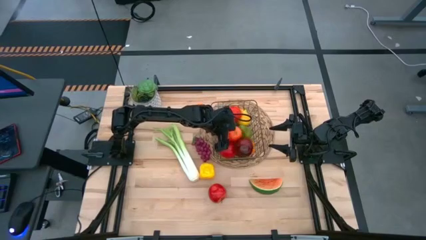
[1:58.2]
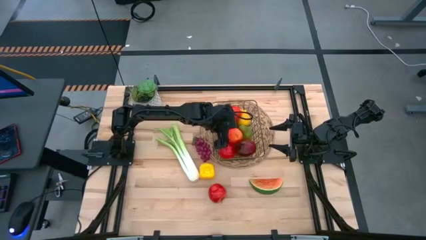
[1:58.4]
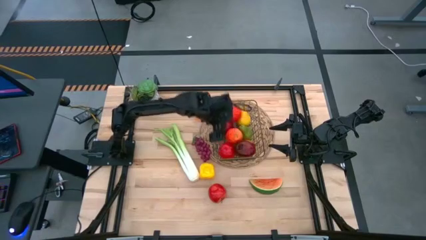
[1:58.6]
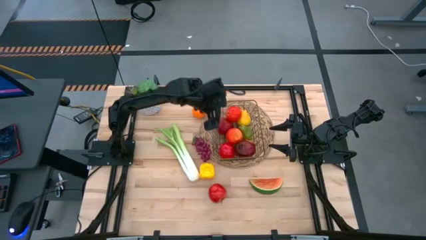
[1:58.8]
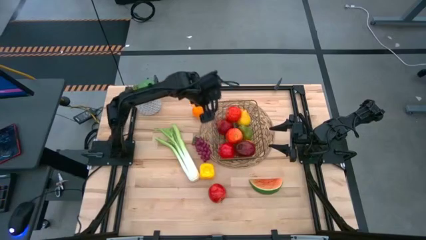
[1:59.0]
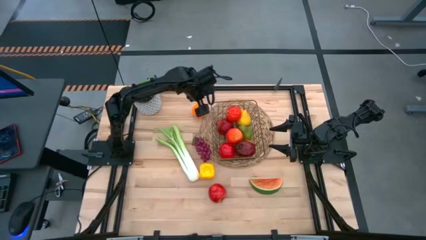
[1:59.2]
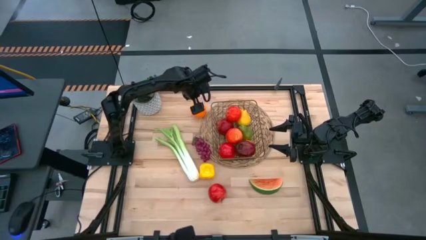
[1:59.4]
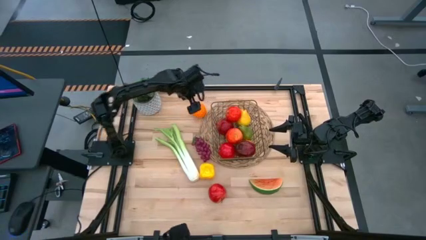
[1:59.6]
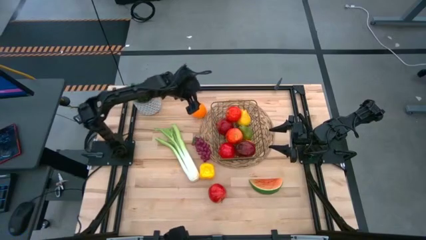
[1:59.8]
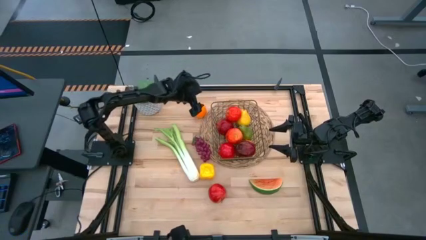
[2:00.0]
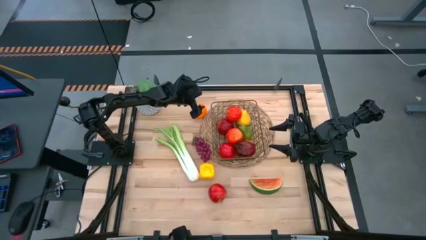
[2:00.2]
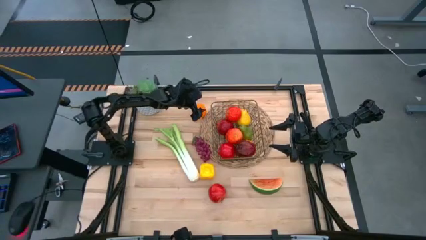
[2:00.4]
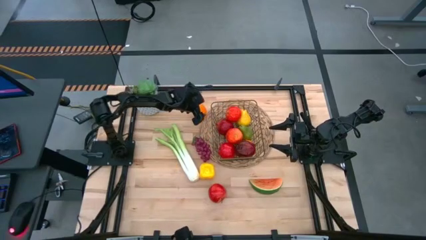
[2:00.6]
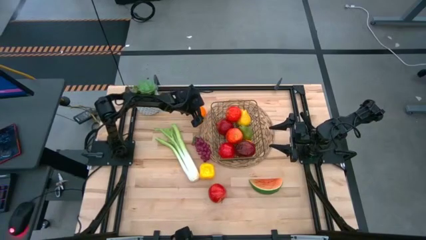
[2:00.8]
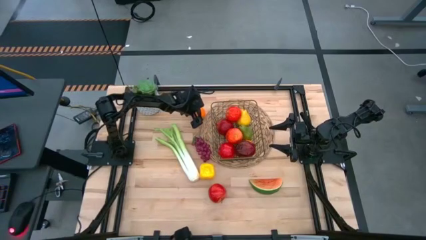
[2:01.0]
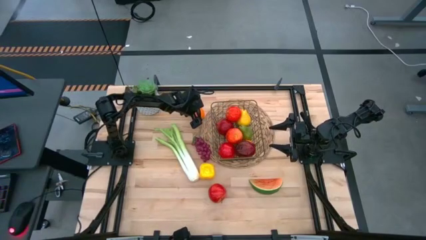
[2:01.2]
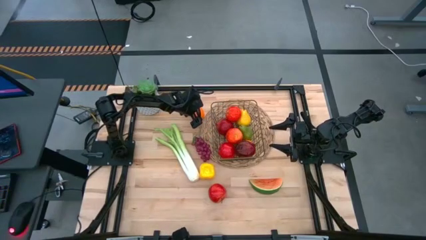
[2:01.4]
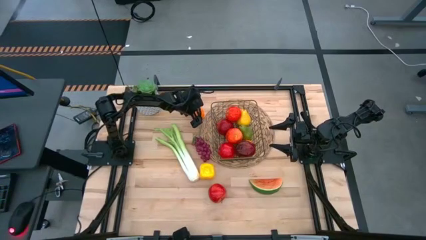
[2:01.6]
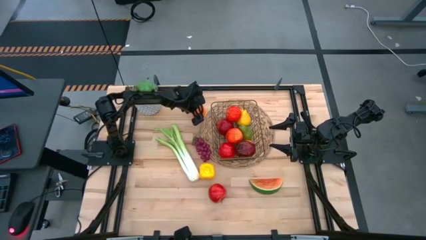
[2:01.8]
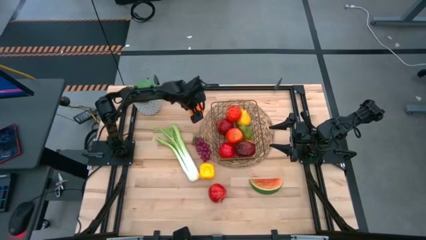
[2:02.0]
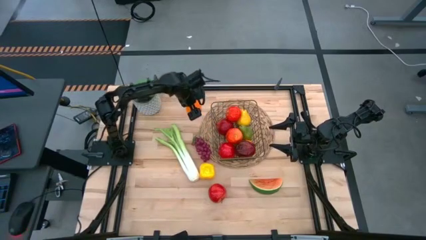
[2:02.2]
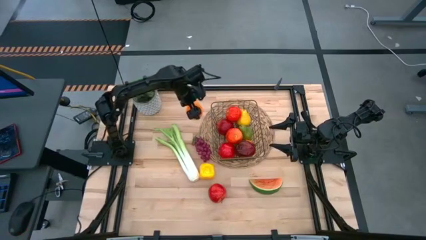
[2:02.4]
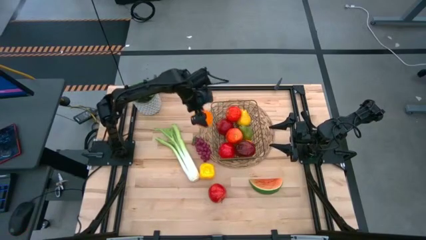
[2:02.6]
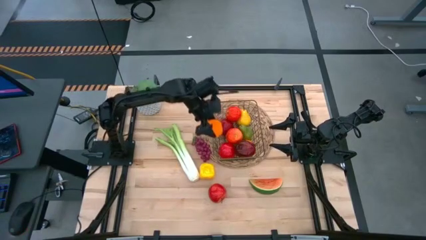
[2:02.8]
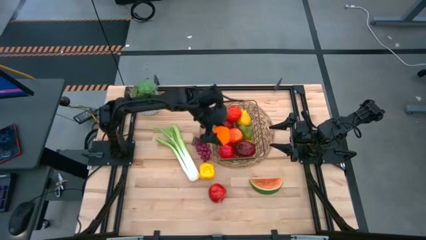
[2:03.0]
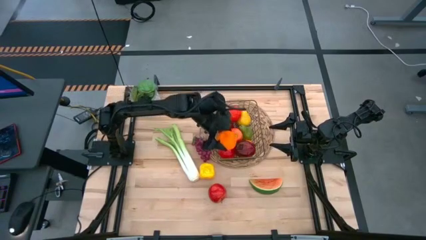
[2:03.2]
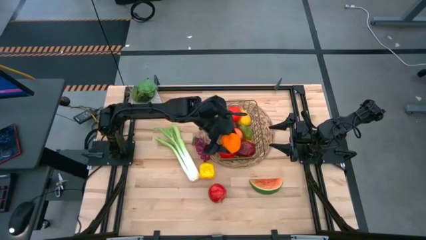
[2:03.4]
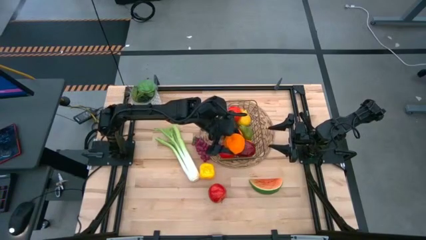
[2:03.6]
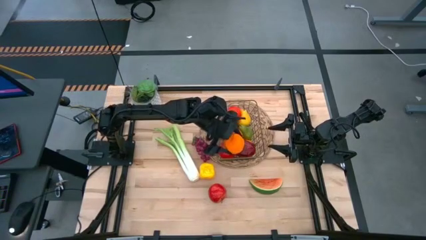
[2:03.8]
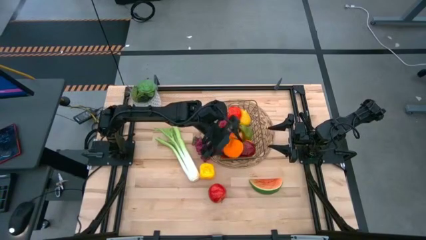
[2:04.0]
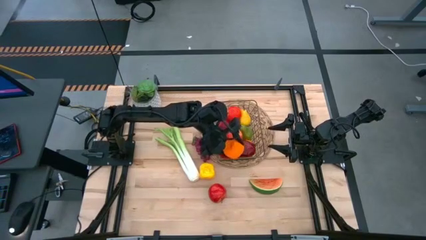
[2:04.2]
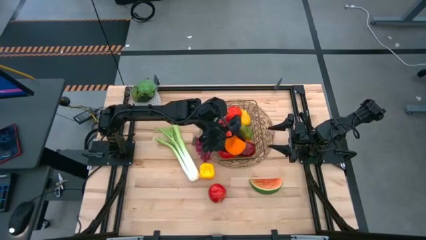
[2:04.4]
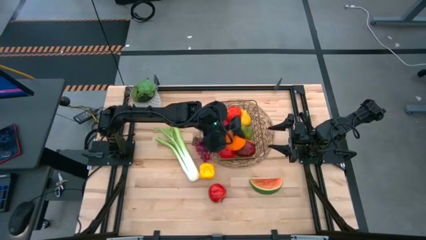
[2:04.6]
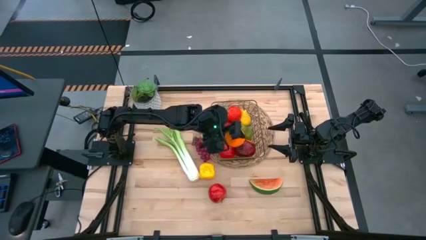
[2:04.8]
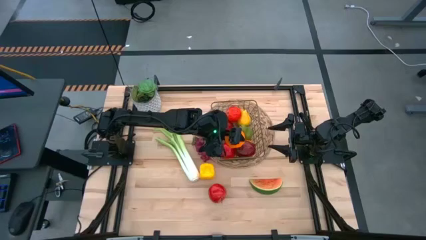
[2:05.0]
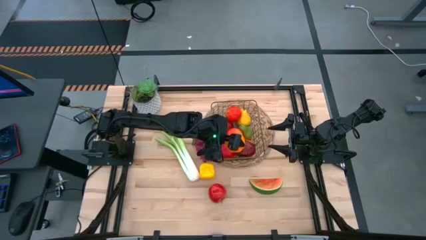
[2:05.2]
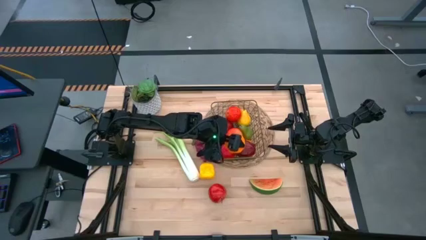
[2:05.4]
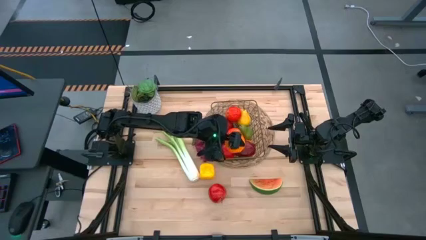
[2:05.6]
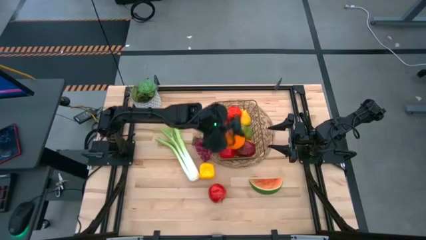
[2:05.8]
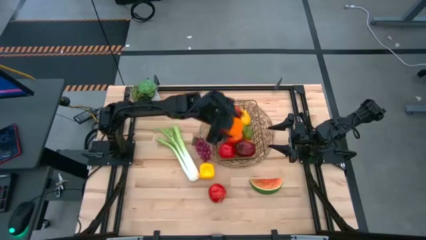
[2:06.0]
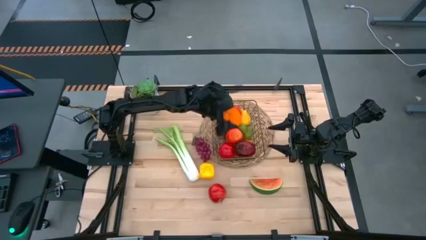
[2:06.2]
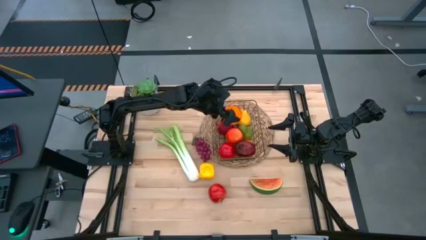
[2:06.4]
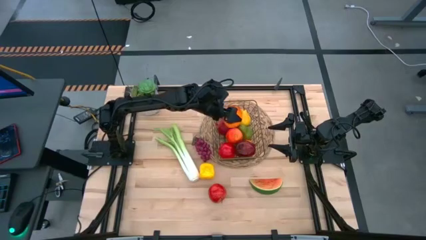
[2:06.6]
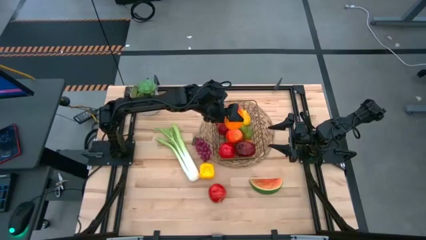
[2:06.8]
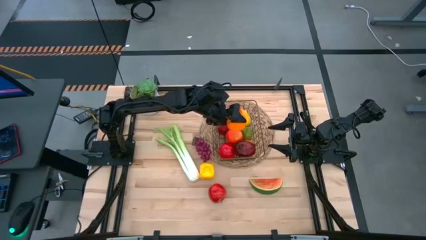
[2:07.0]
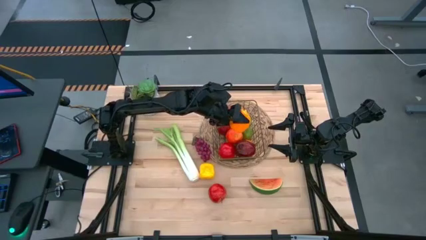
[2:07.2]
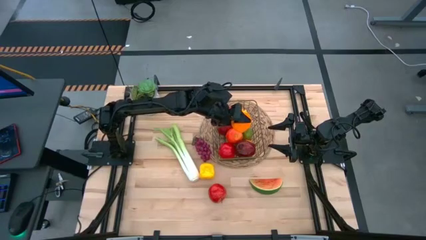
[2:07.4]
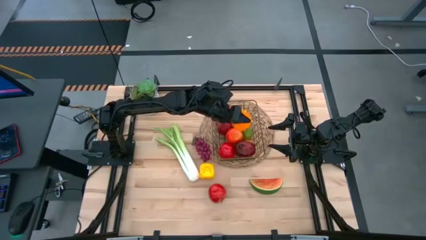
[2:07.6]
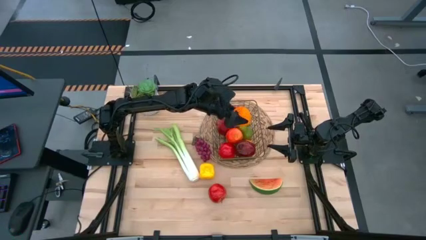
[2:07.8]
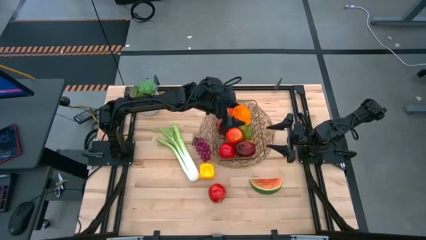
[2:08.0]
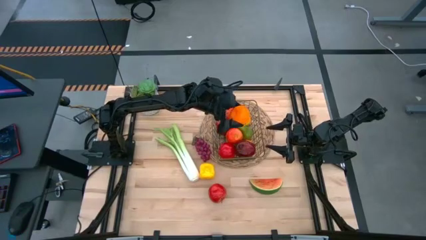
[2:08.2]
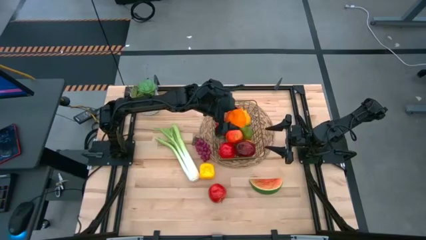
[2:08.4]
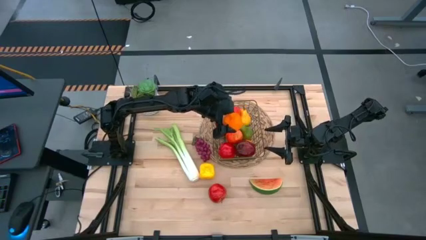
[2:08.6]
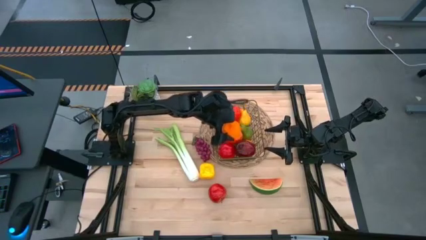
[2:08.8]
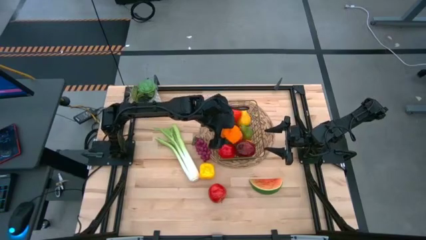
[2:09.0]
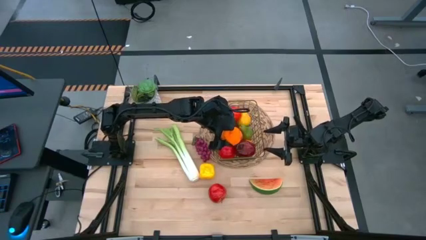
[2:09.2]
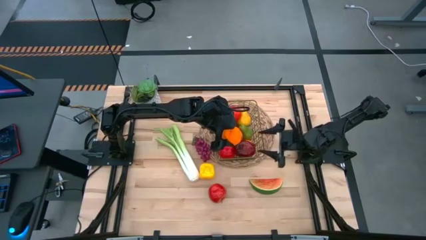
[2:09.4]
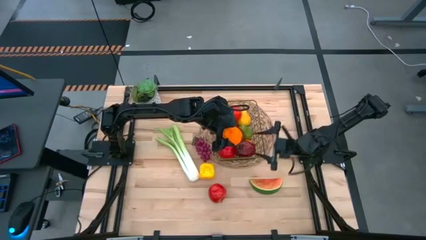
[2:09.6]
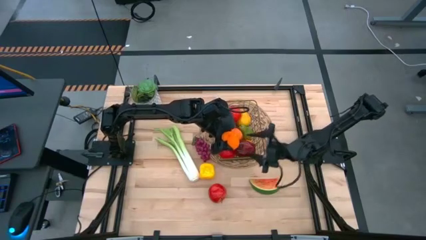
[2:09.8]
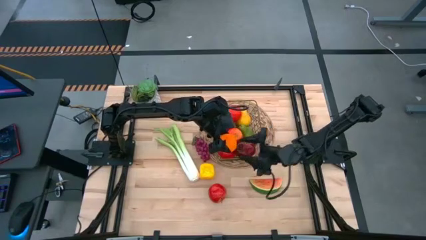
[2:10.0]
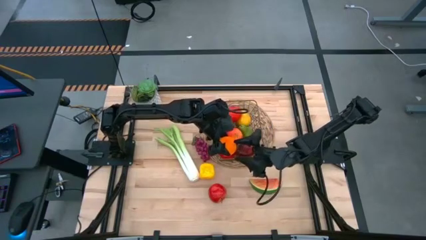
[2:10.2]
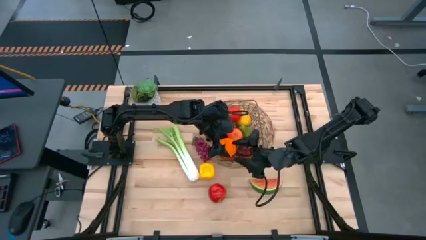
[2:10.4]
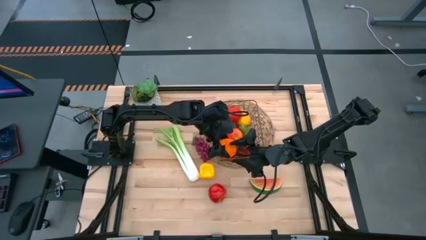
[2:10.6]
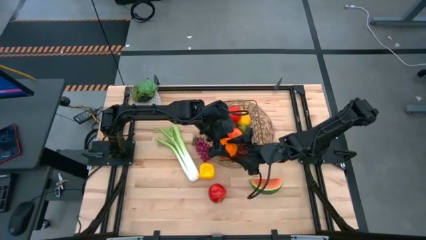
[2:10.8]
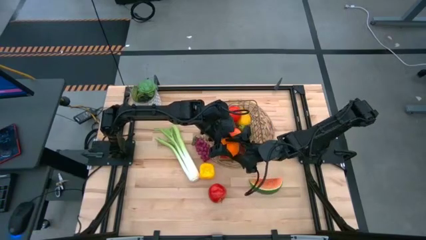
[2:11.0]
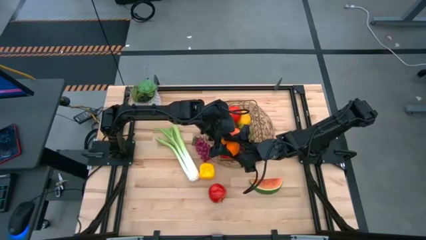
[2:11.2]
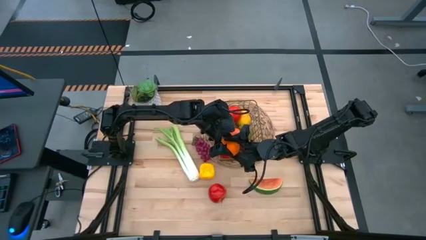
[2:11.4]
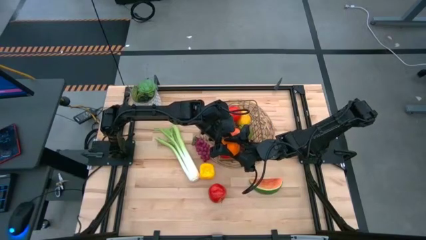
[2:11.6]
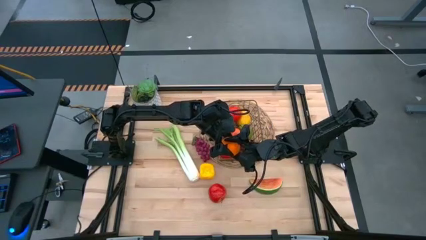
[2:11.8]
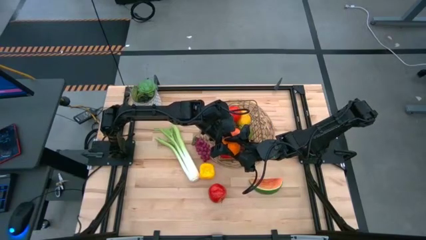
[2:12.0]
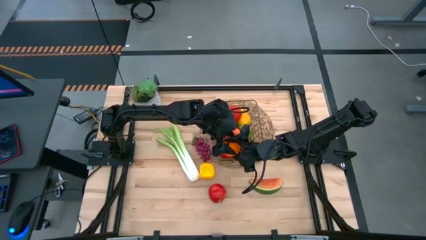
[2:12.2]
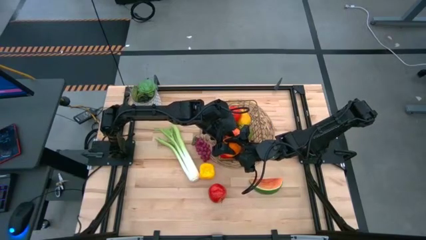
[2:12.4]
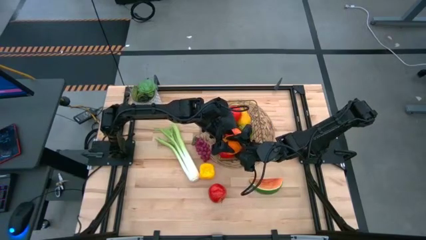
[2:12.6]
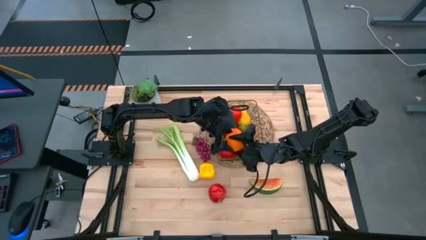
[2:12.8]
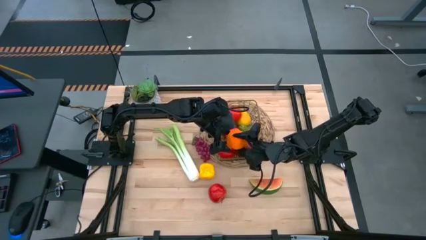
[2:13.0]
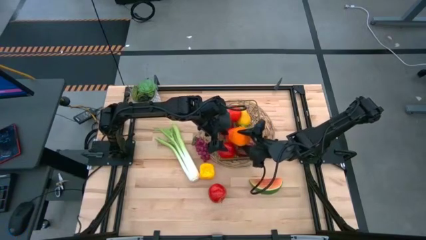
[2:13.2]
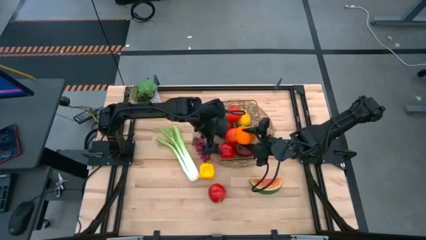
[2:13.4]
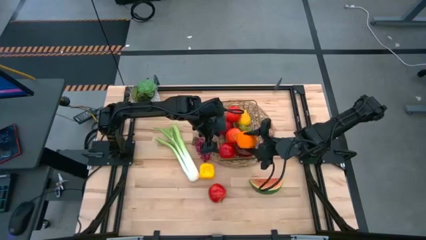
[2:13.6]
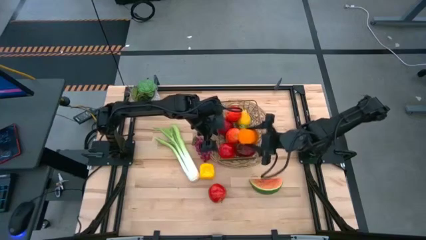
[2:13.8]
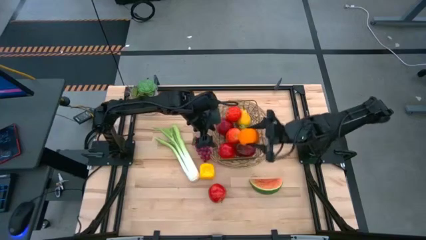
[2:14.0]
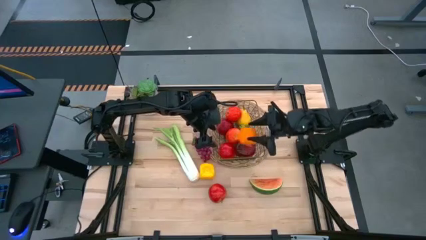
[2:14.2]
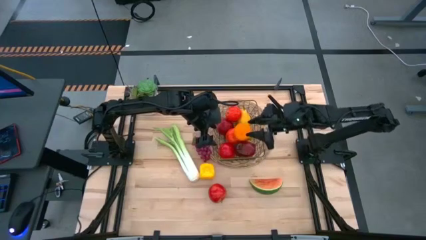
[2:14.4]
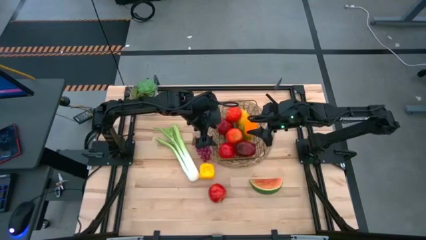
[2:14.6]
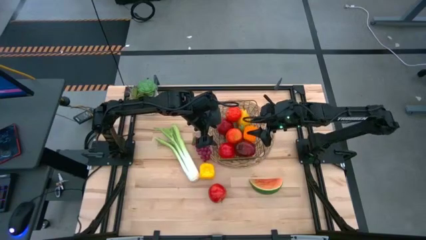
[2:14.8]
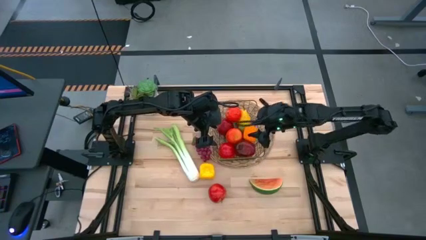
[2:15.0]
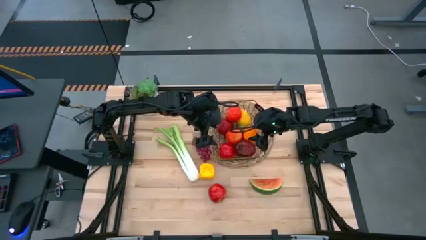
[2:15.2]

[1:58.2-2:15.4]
Task: Build produce basket
Put the orange into the wire basket
